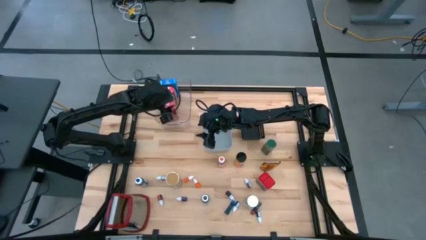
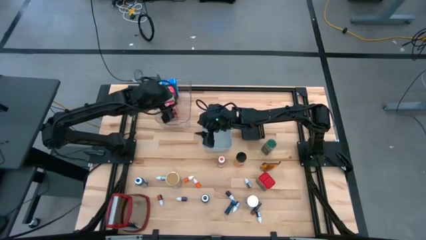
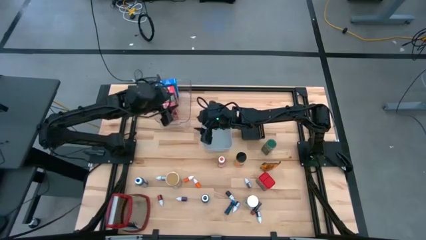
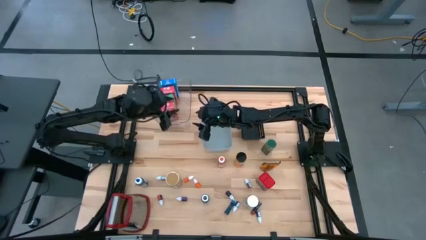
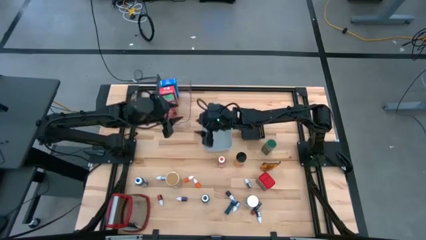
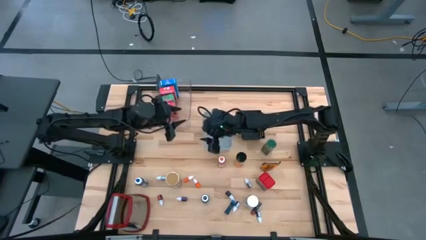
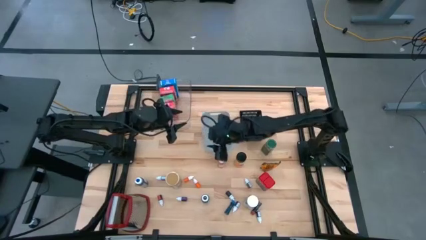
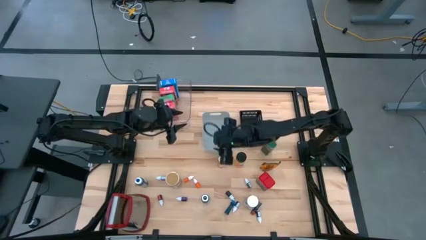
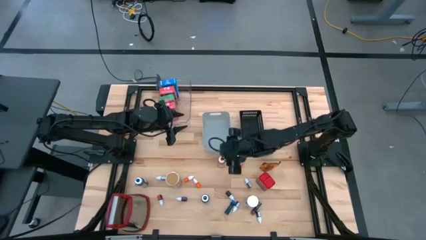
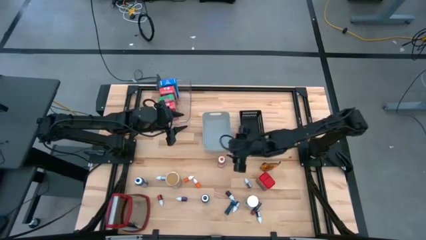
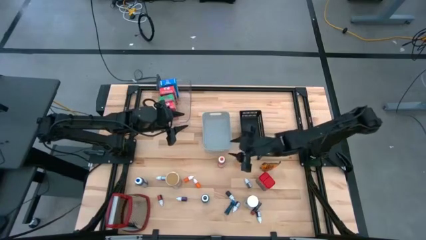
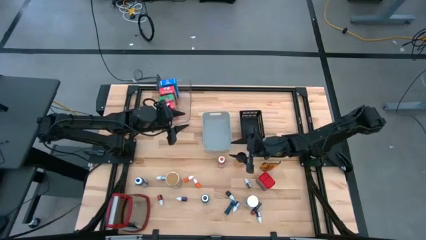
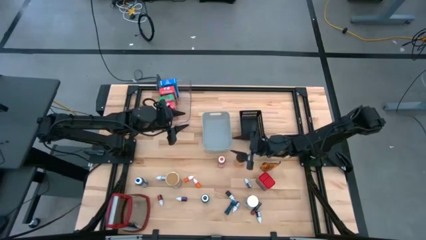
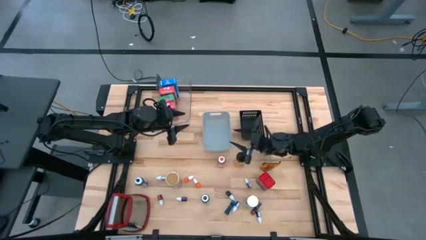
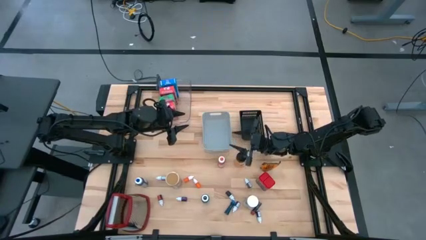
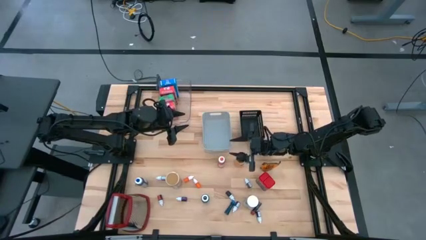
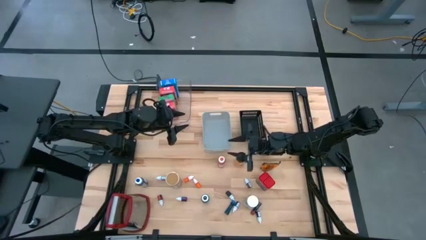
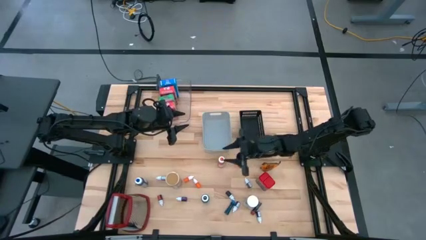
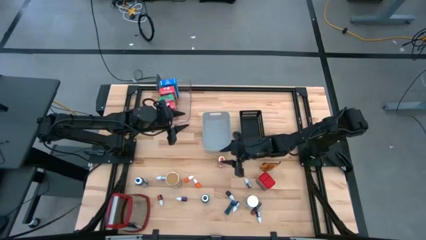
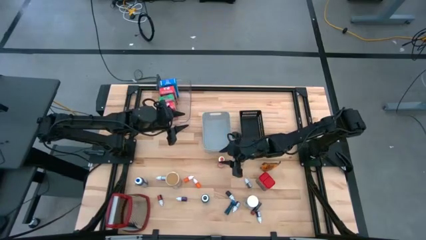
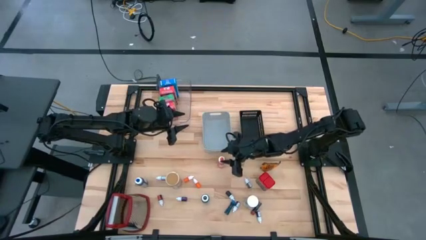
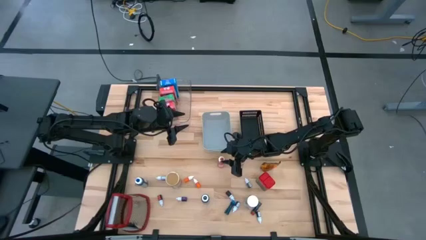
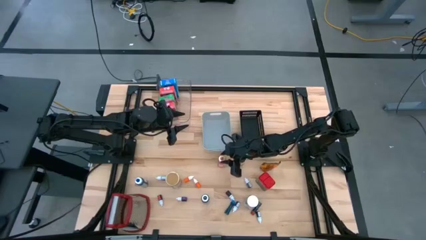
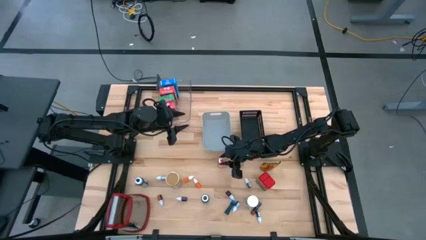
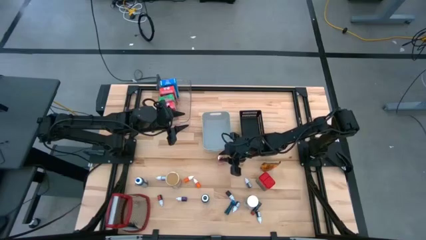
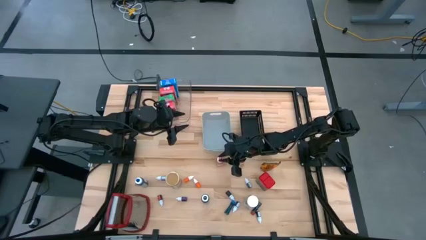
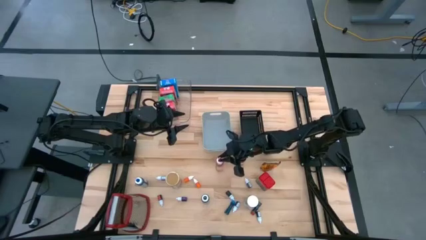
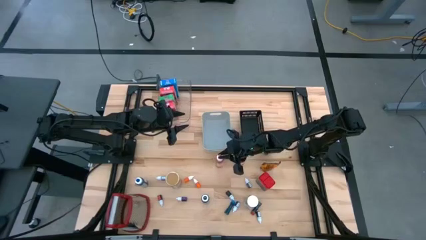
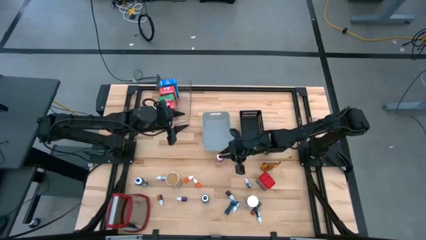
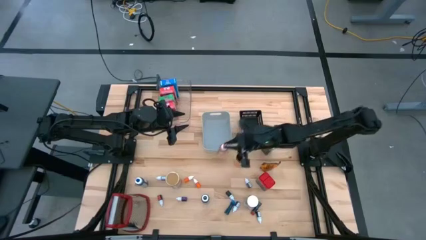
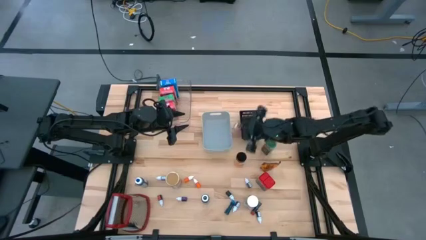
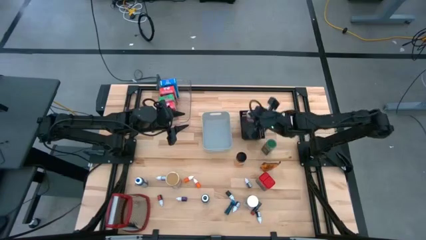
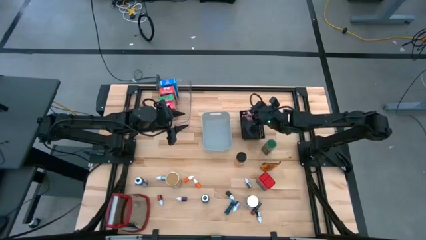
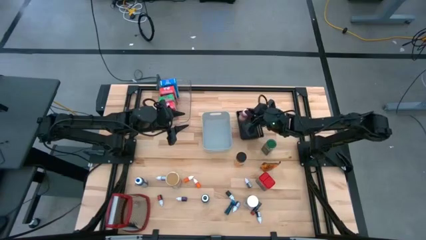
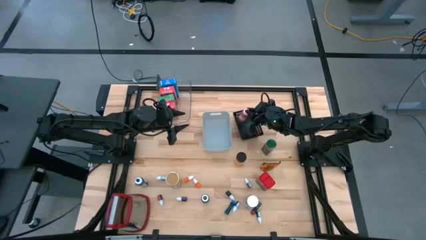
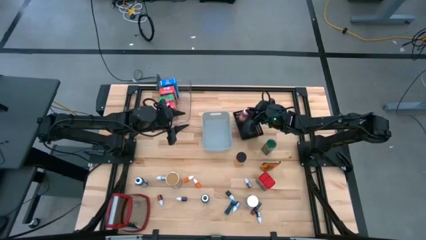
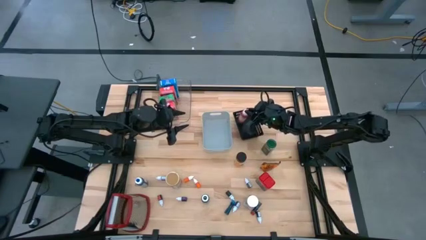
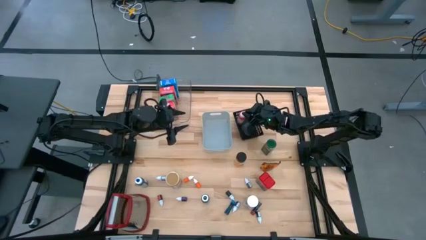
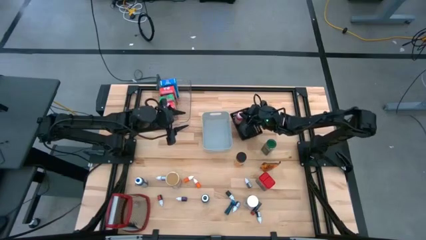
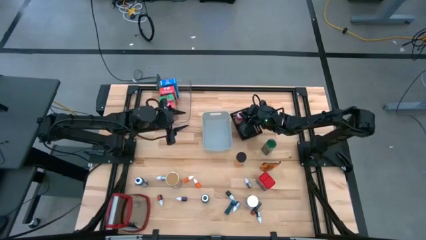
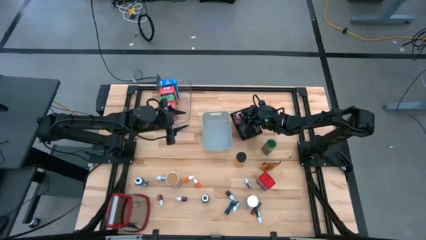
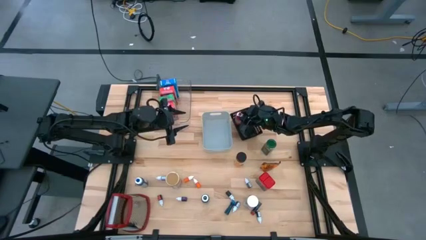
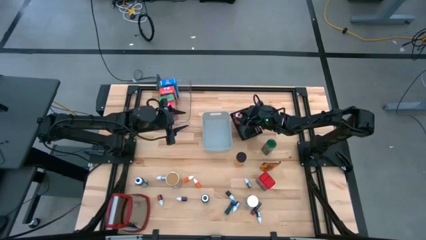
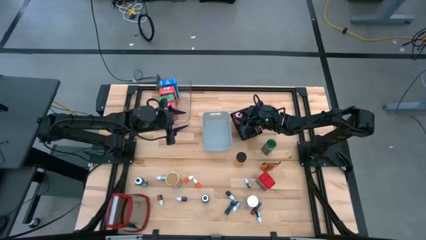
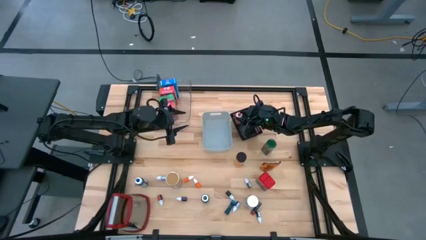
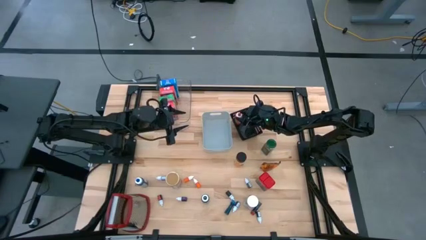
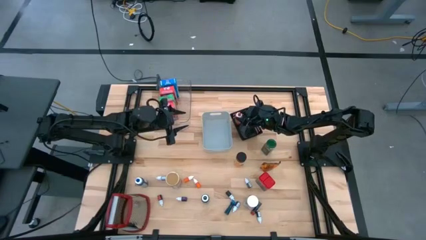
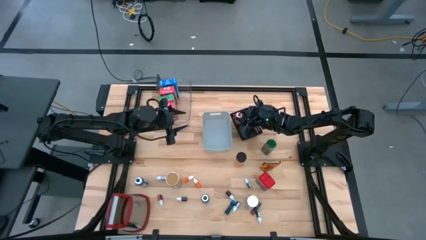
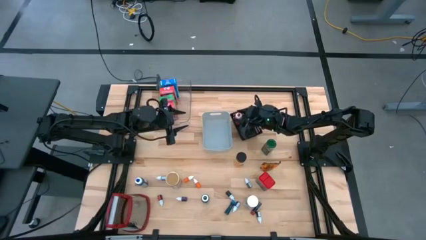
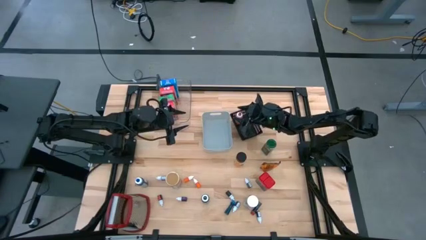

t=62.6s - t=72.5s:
Task: Pick & Place Kitchen Items
Put the orange food coloring bottle into the black bin

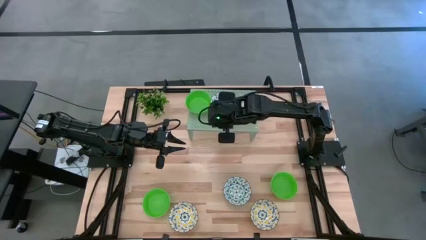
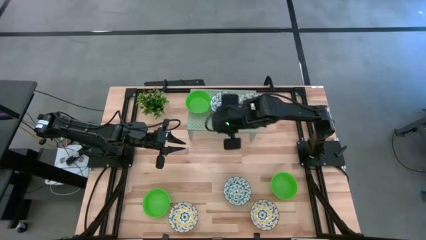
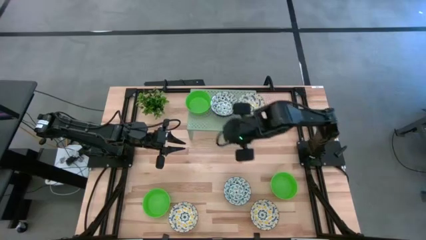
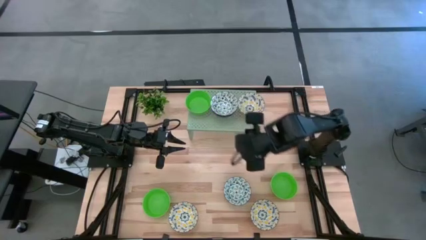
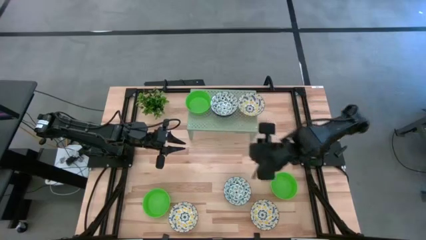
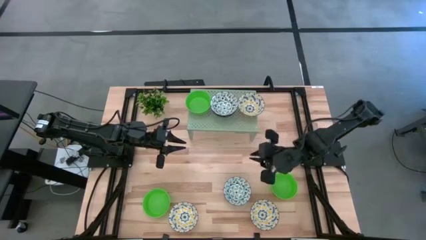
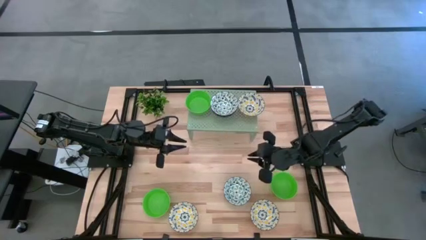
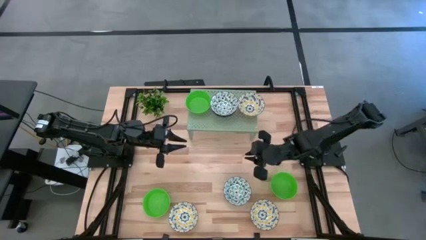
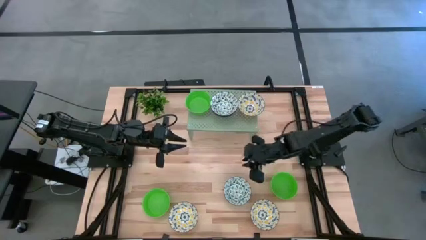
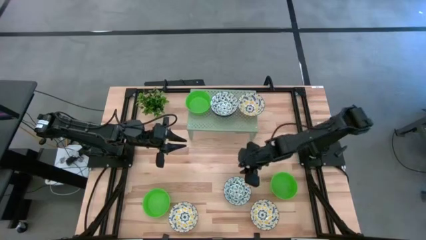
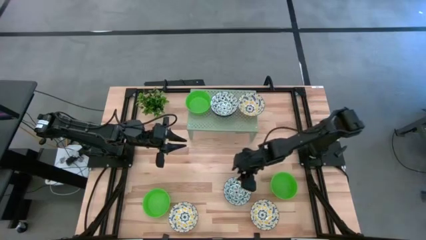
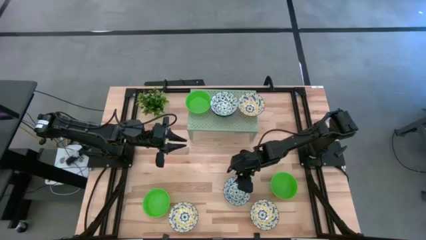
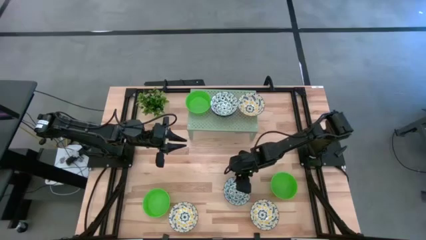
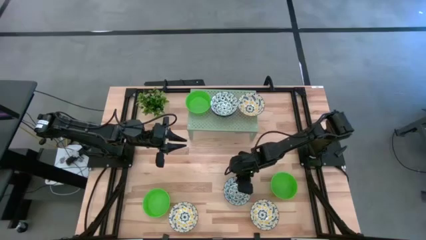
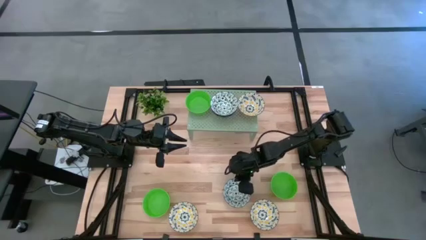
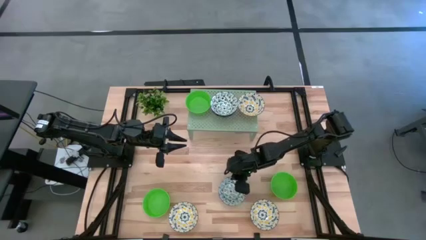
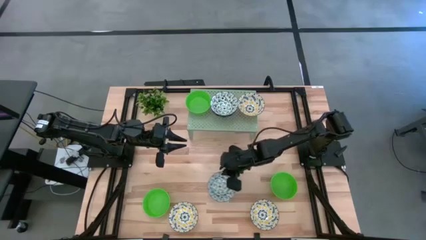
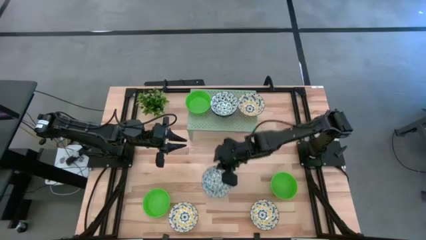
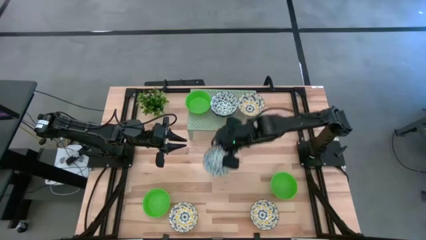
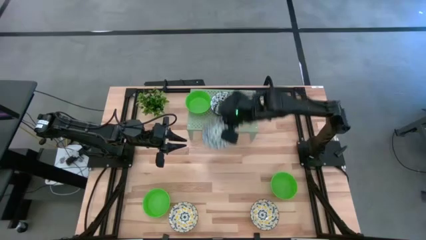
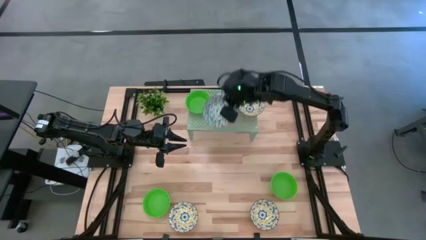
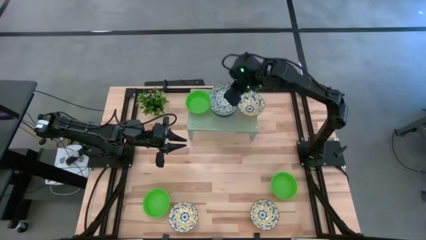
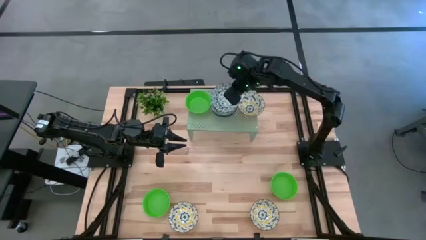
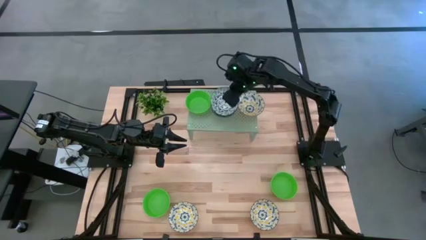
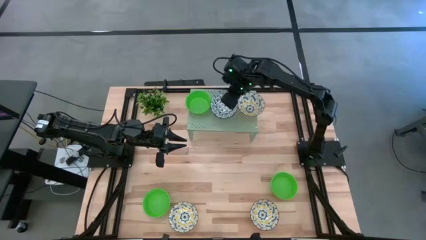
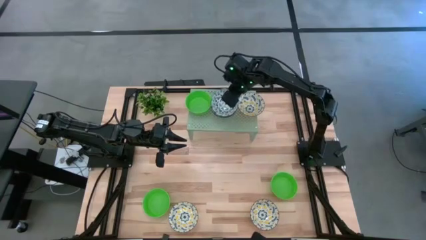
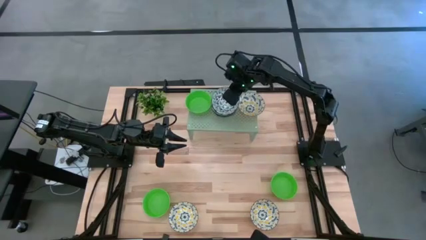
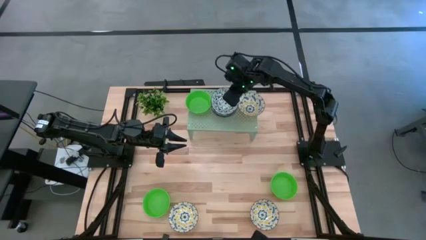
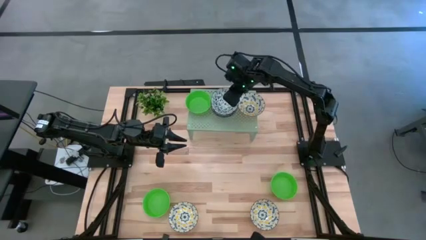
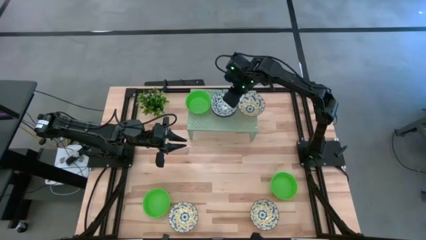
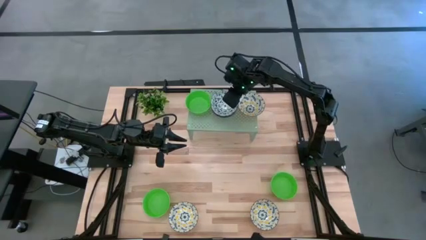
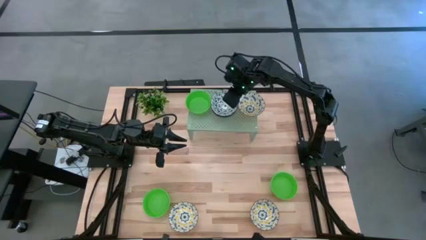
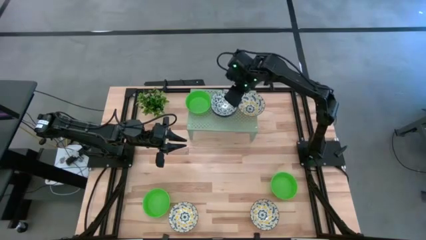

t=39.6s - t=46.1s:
Task: Pick & Place Mini bowls
Stack the blue bowl on top of the blue bowl on the shelf
